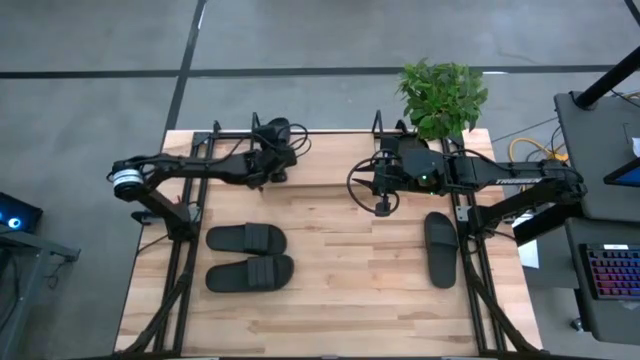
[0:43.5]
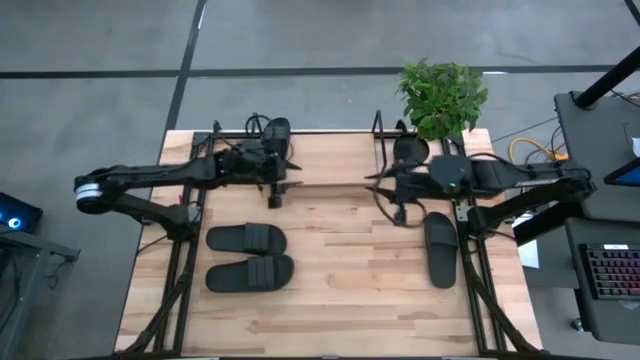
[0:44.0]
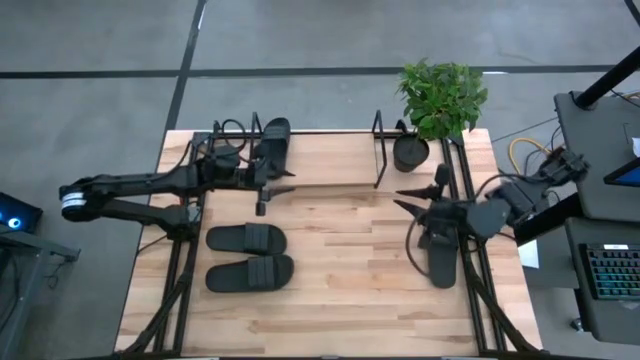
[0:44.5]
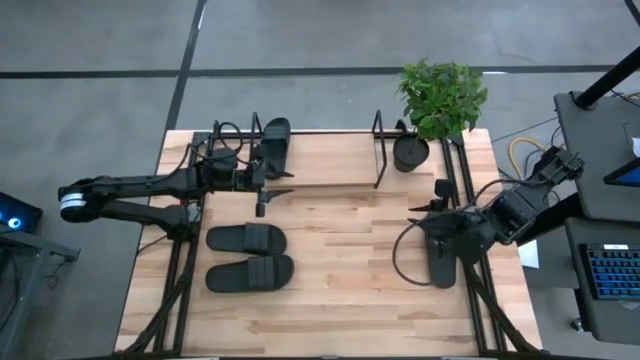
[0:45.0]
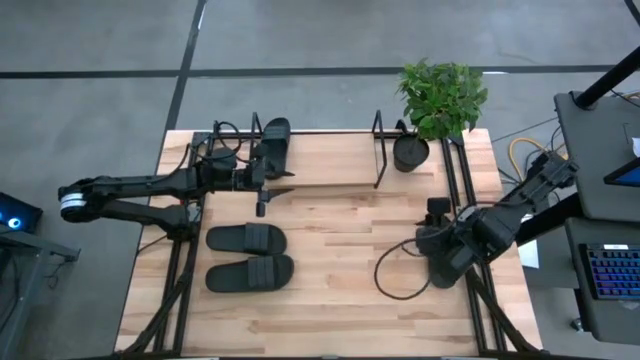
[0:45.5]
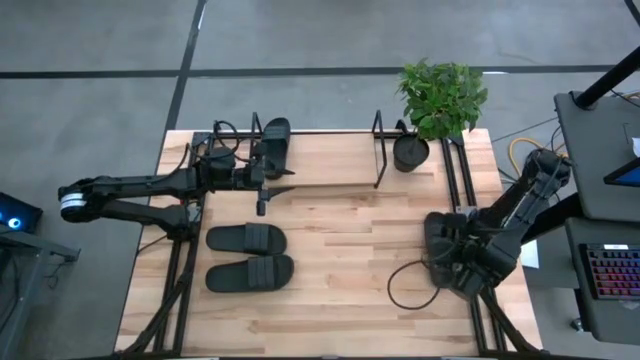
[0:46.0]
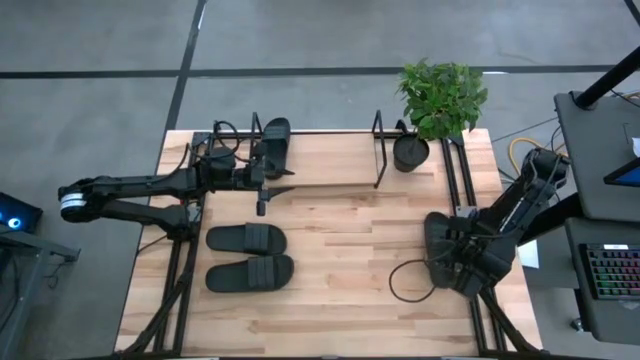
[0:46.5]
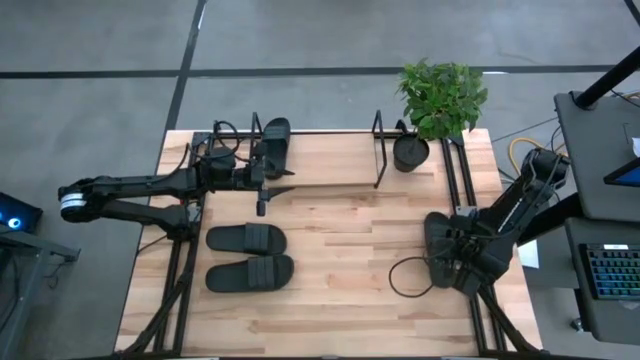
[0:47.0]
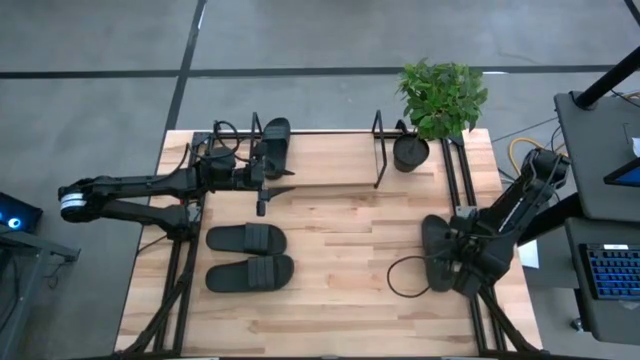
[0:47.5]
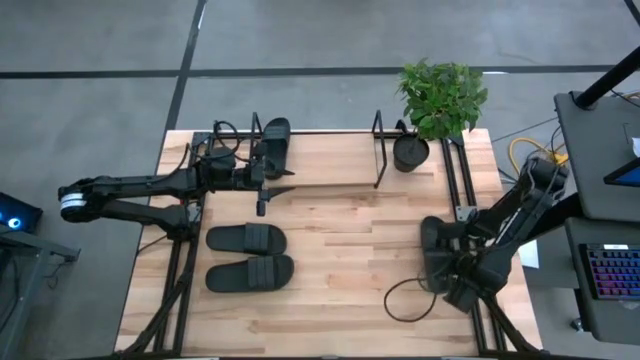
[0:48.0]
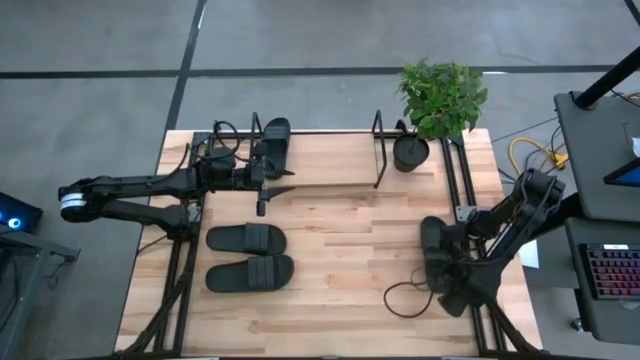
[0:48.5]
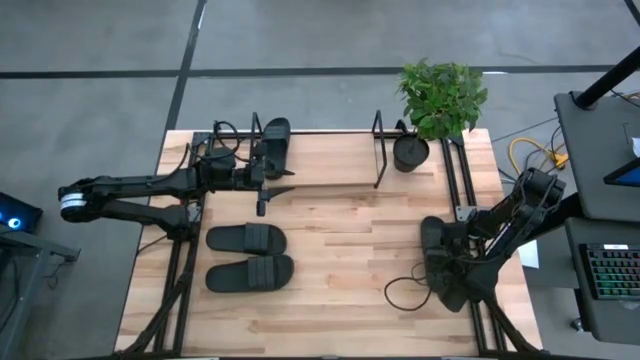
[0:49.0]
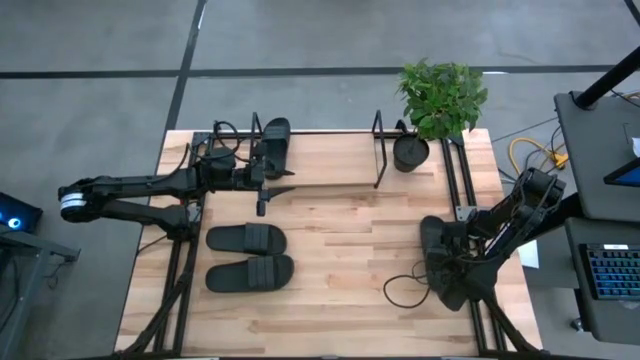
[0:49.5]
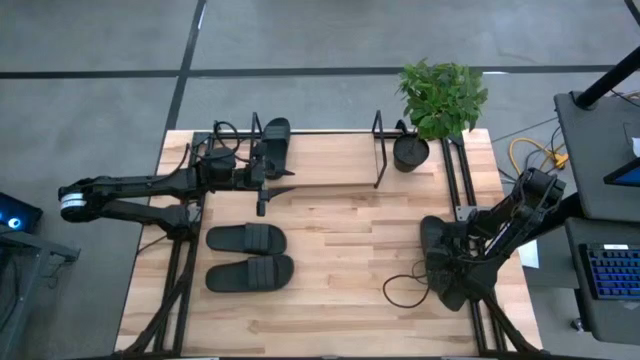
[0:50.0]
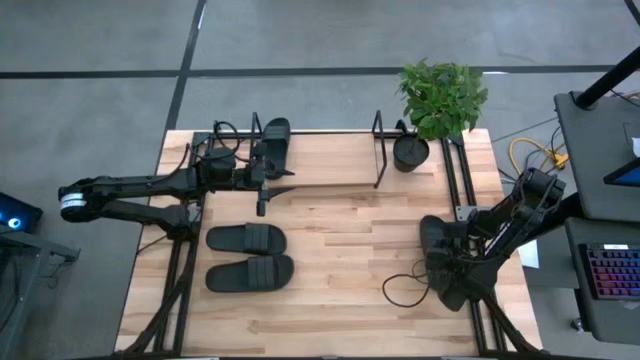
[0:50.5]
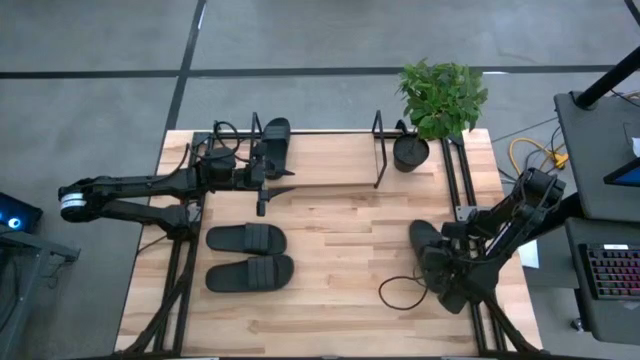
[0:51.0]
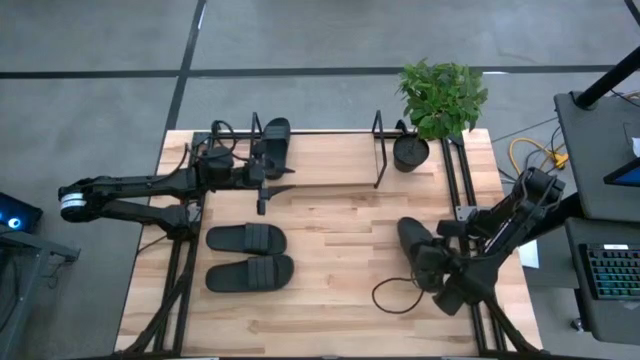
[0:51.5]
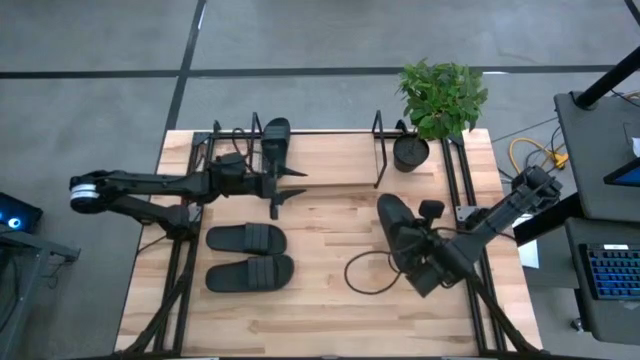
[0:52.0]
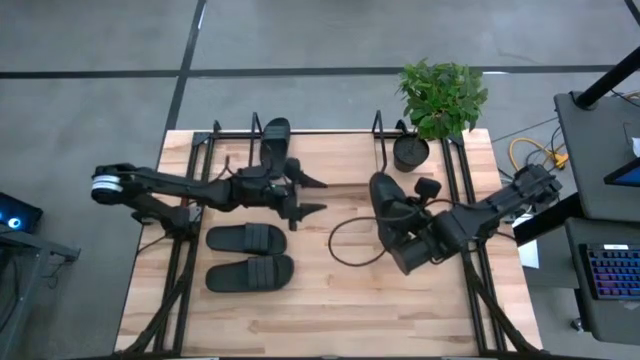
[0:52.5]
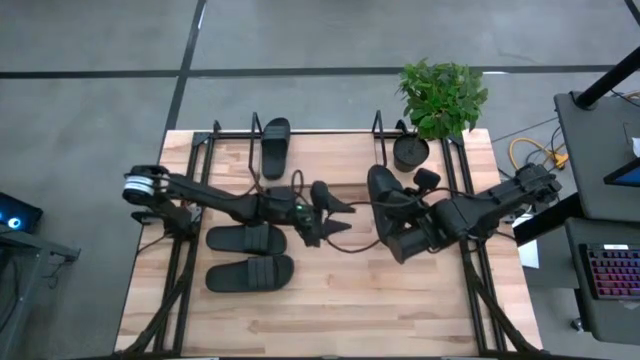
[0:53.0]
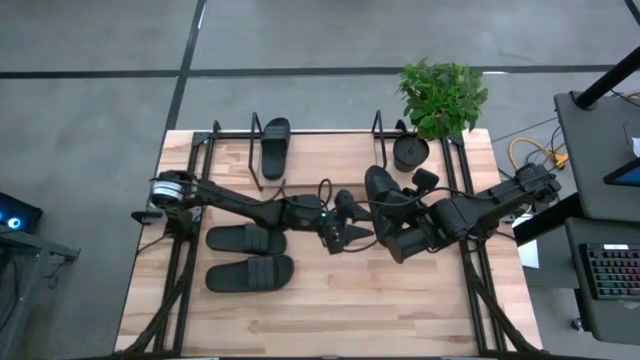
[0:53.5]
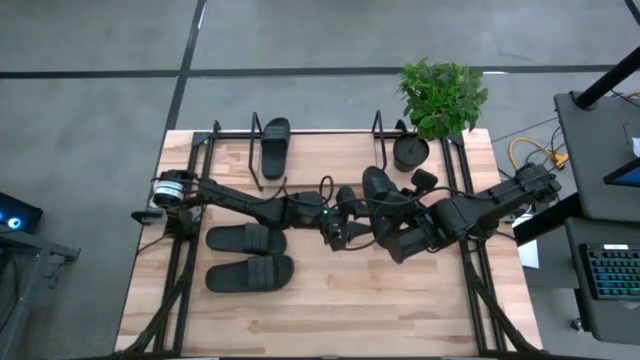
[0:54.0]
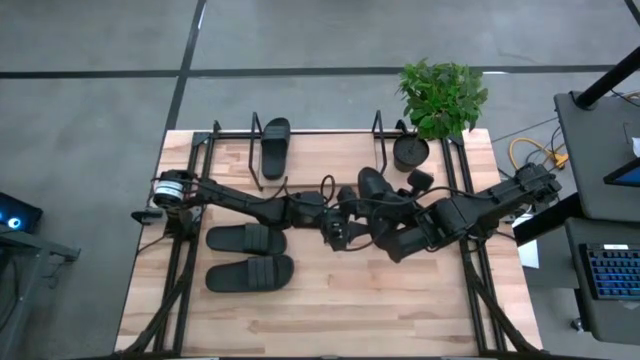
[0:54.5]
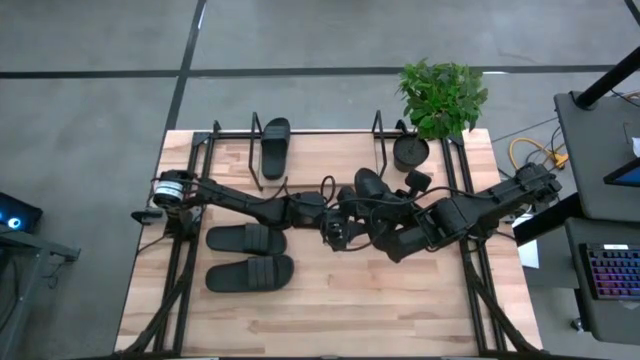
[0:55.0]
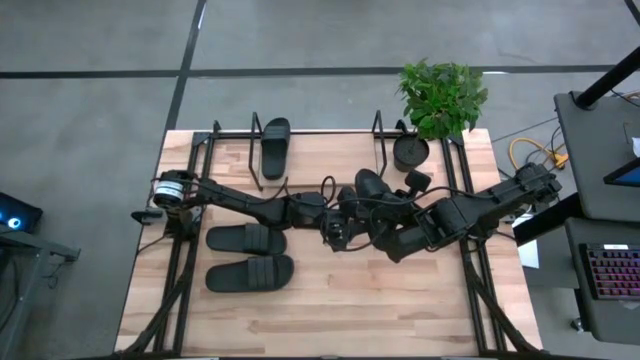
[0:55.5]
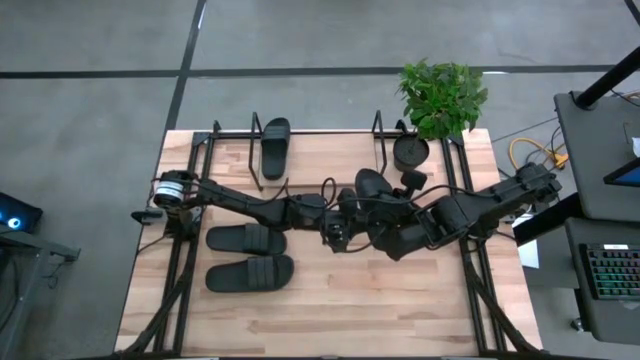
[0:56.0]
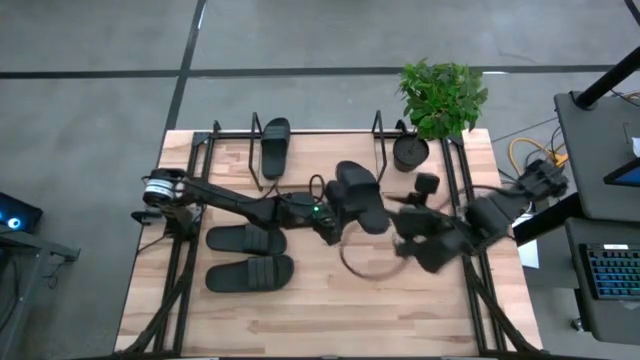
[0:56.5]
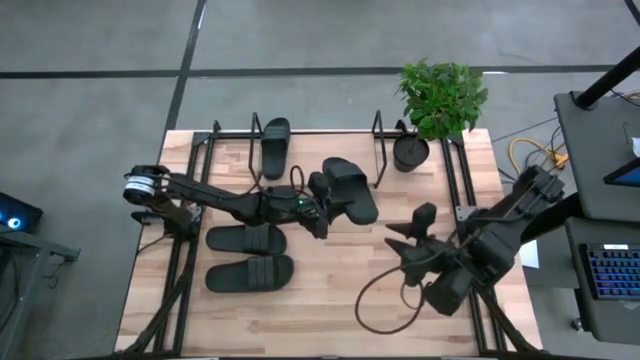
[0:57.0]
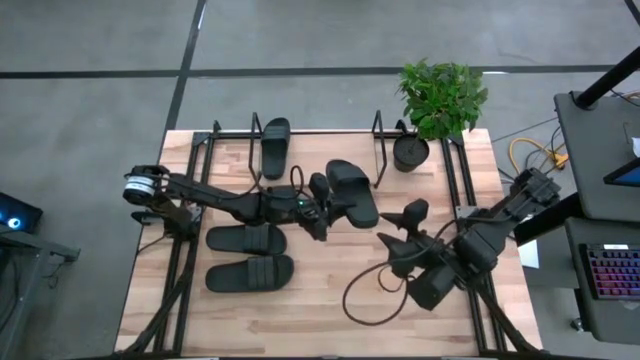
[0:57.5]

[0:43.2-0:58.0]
Task: Pick and place slides into the shelf
Put the black slide on the shelf

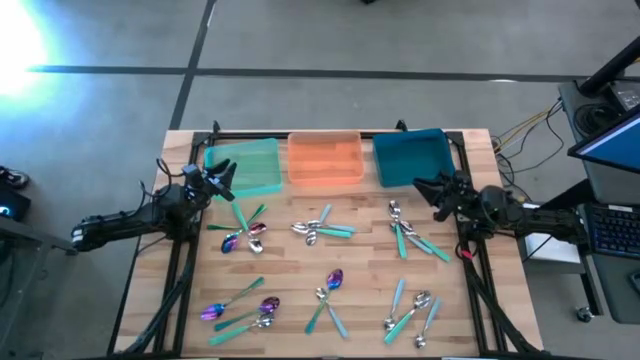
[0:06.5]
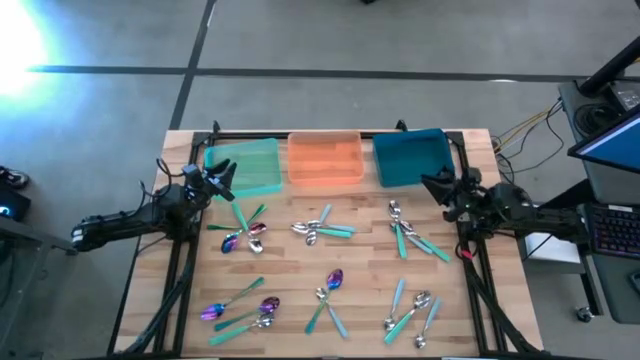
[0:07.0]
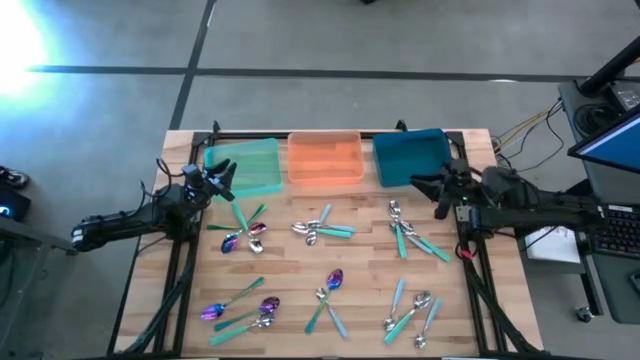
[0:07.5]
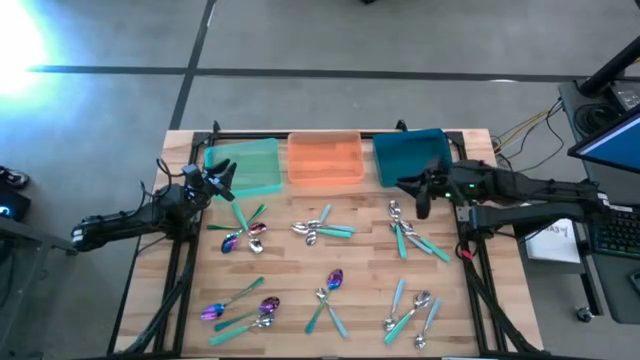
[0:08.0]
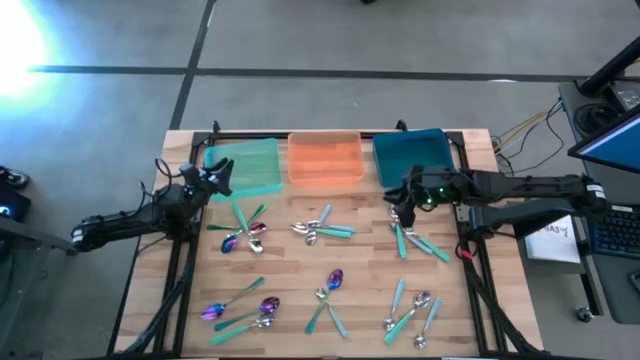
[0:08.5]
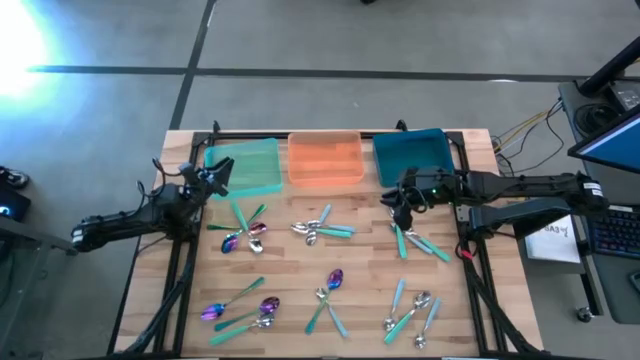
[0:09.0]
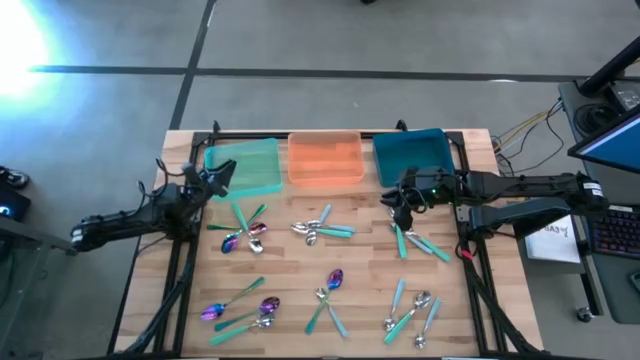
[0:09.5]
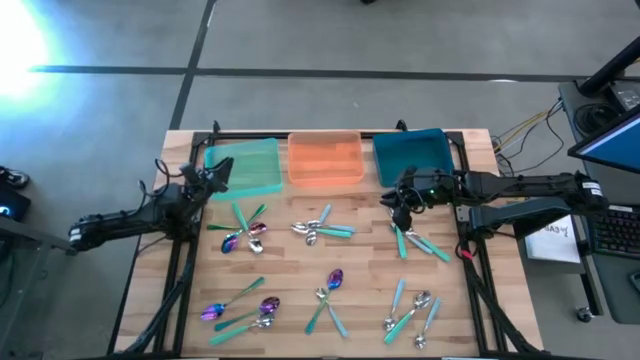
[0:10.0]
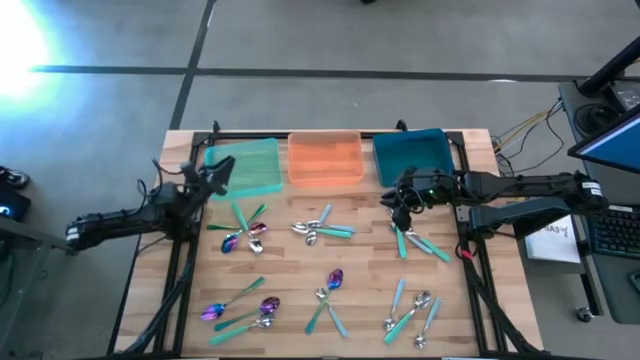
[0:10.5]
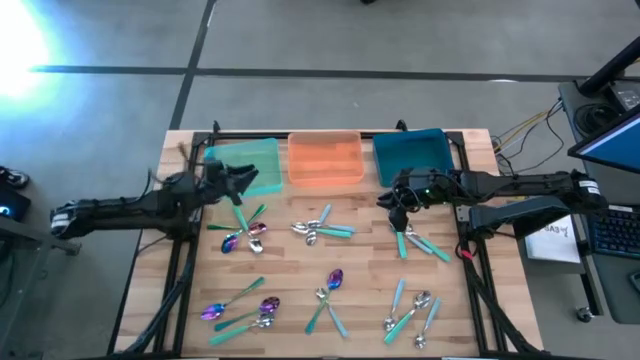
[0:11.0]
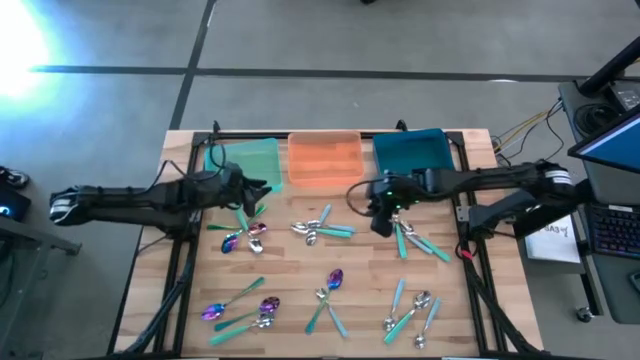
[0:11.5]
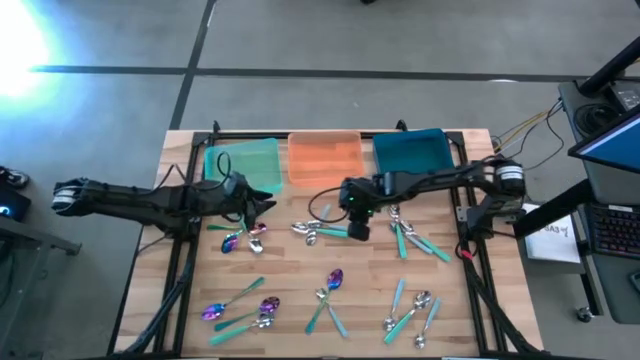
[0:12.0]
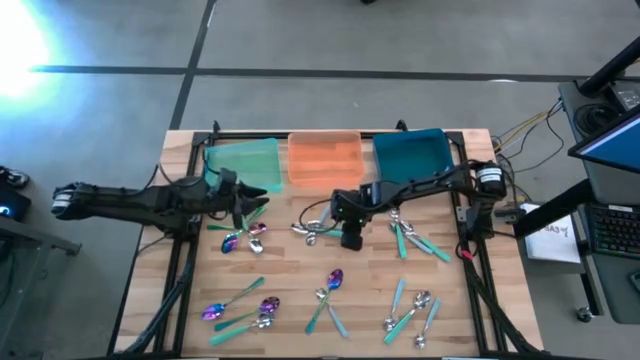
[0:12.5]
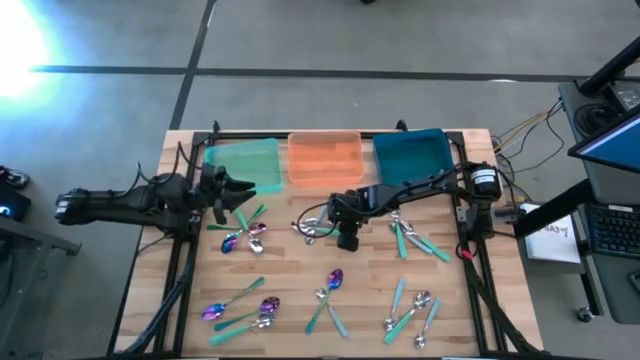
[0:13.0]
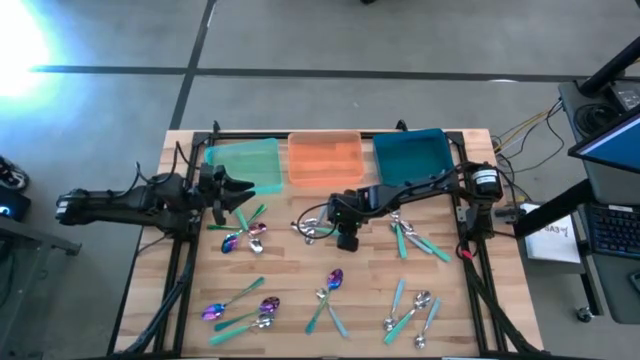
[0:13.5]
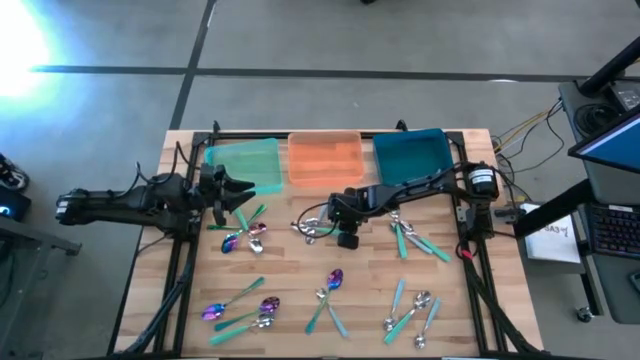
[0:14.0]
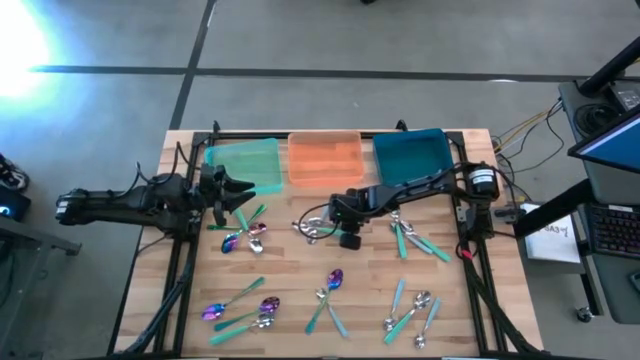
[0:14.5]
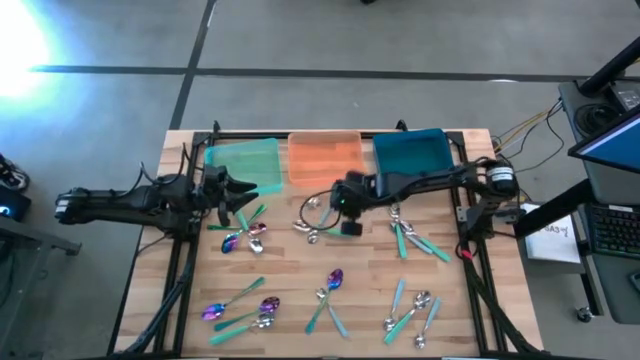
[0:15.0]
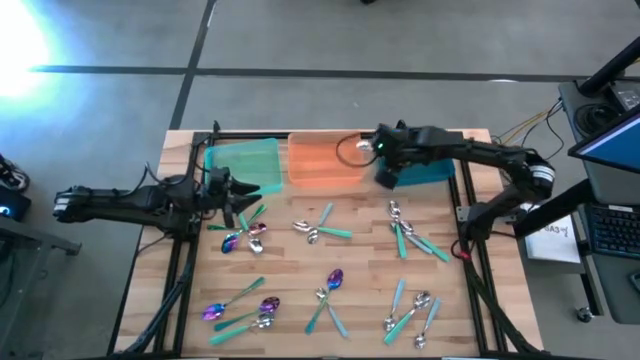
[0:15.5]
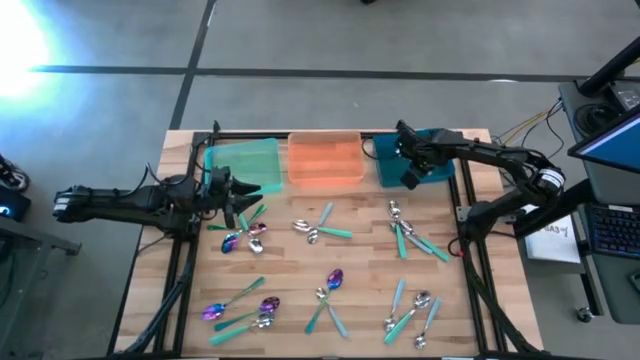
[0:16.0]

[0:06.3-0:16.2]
Task: Sort silverware by color (type)
Put the light blue spoon into the blue bin
